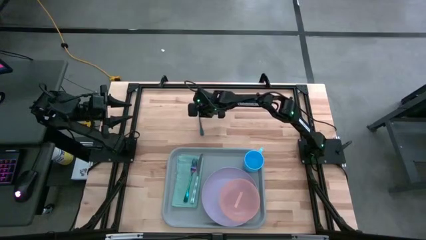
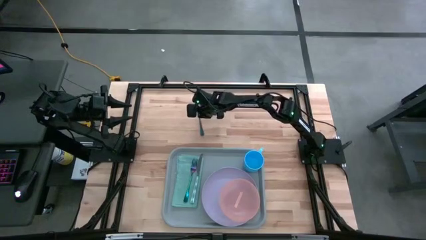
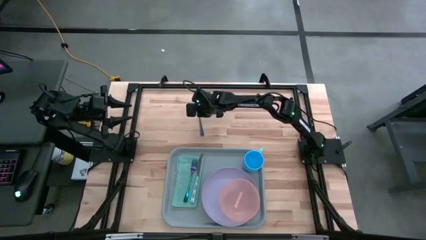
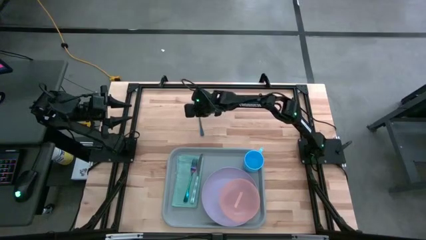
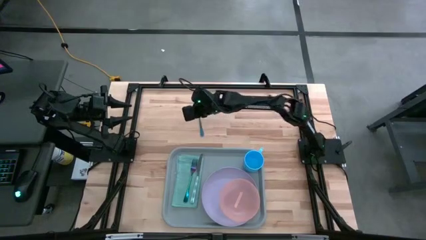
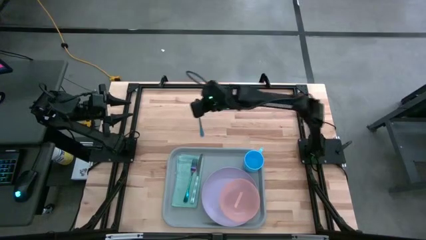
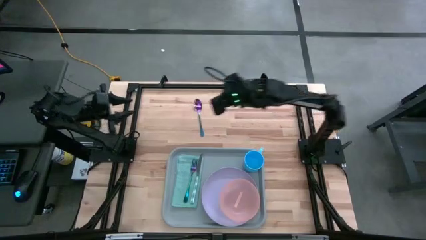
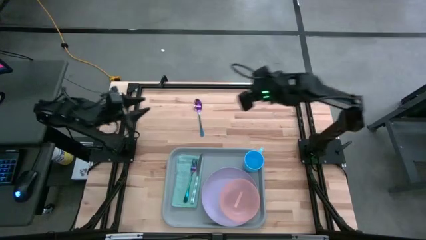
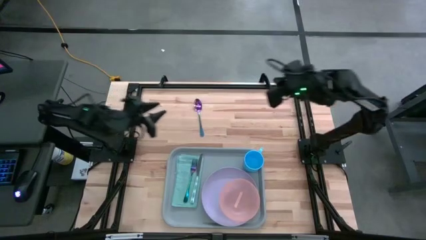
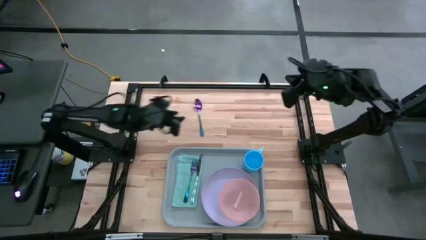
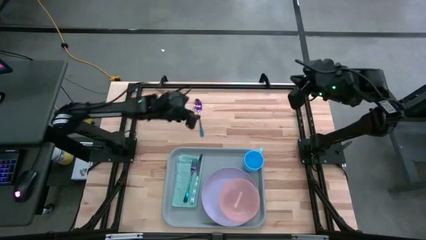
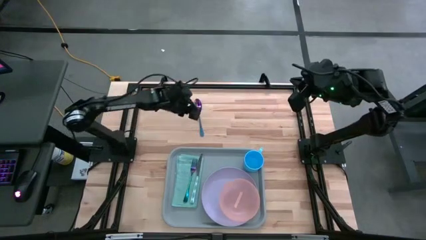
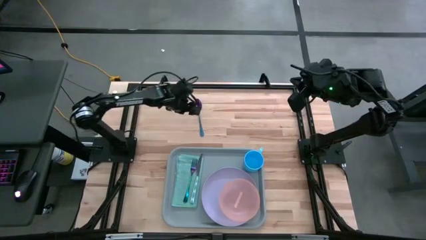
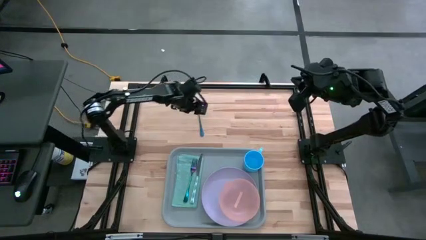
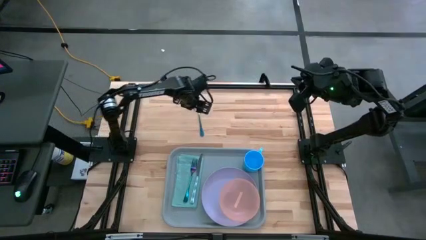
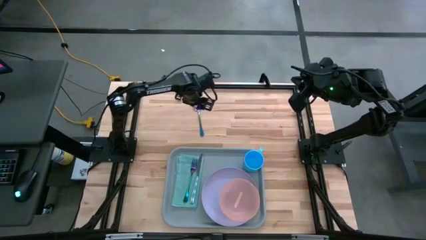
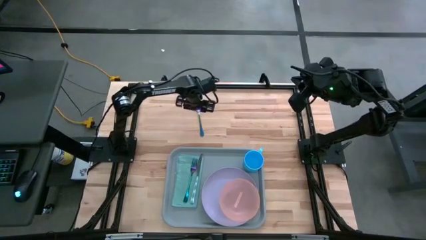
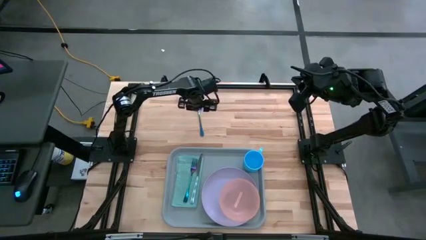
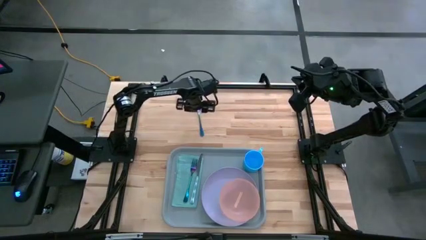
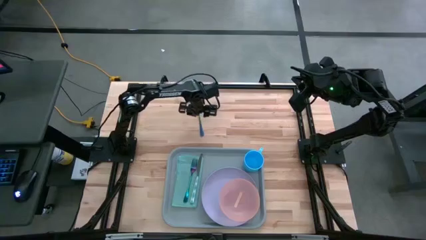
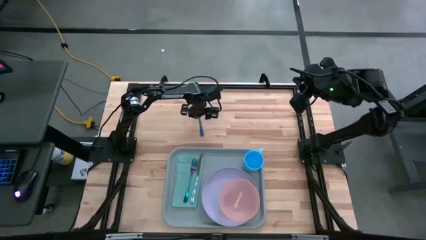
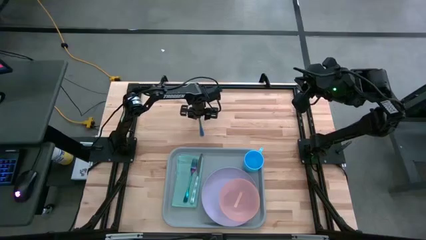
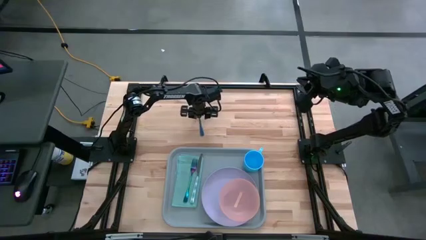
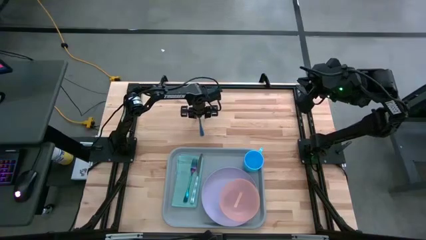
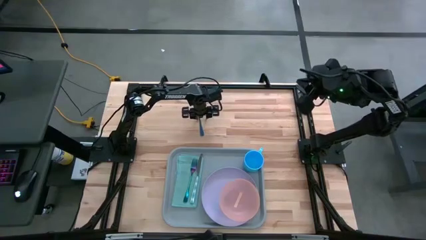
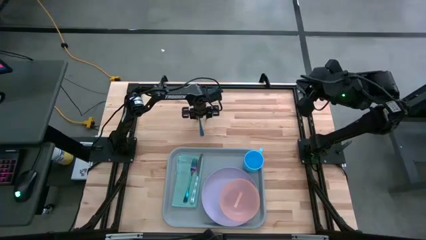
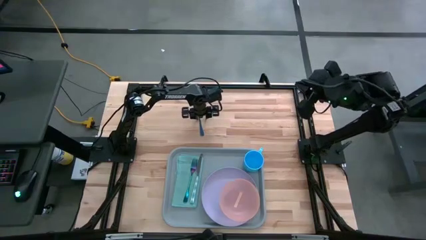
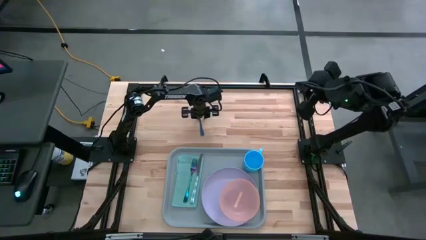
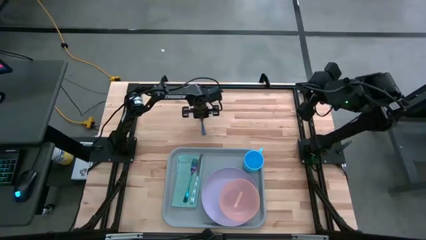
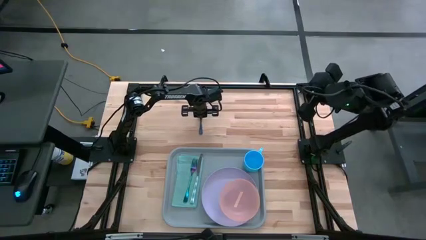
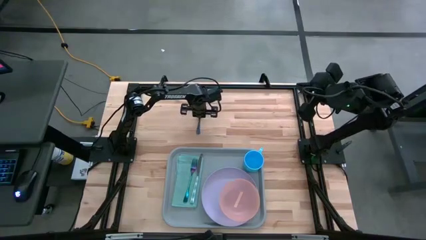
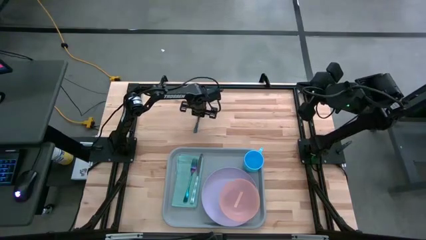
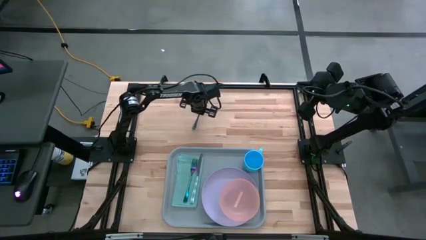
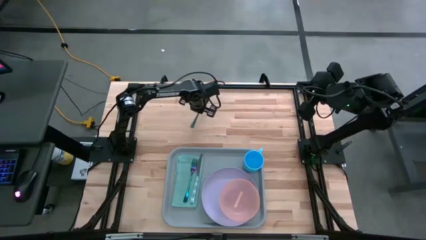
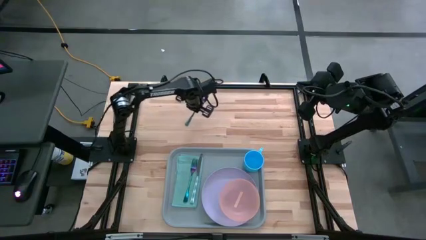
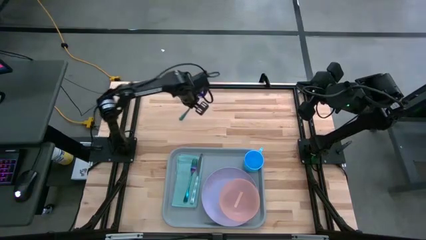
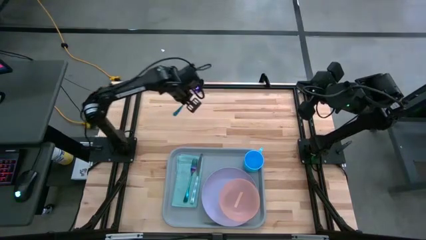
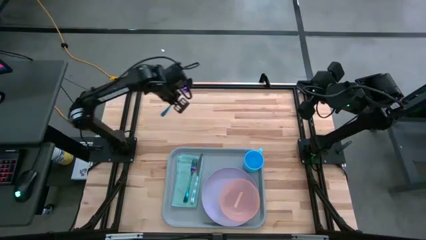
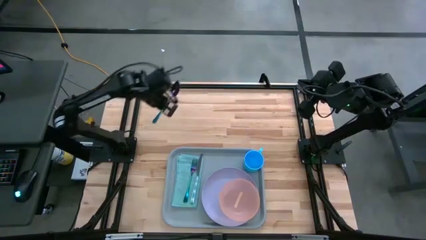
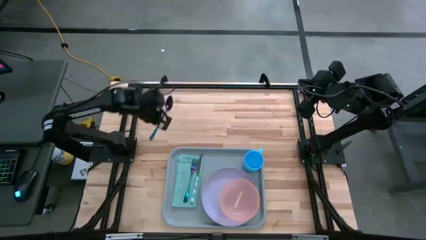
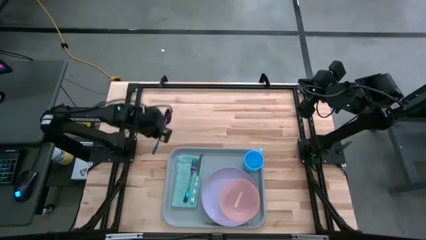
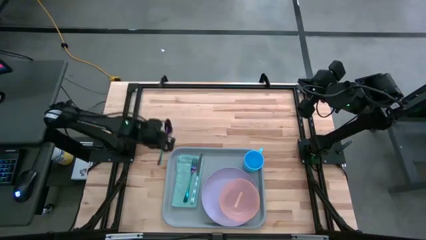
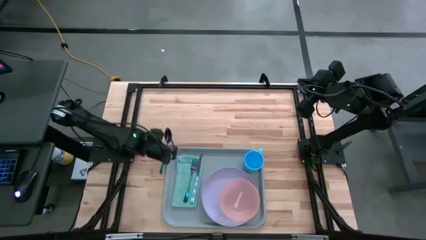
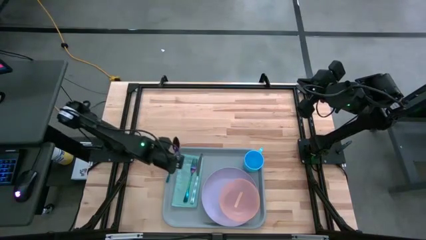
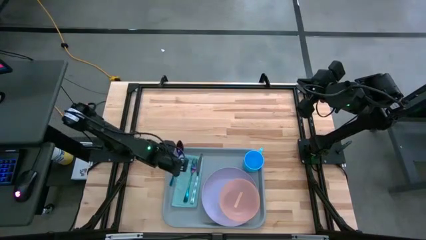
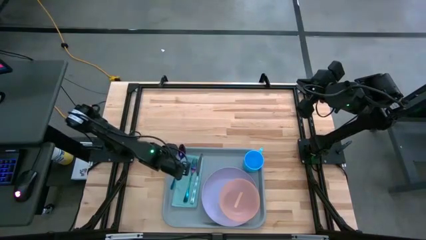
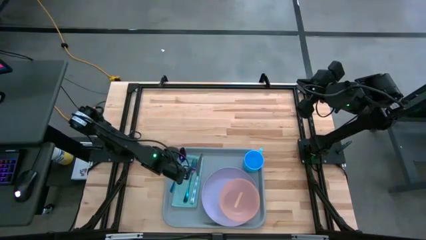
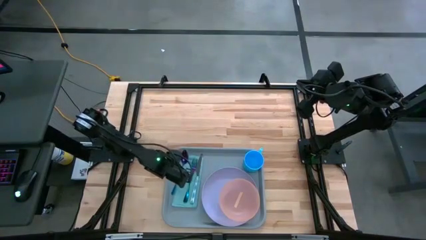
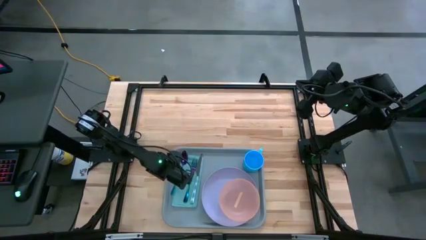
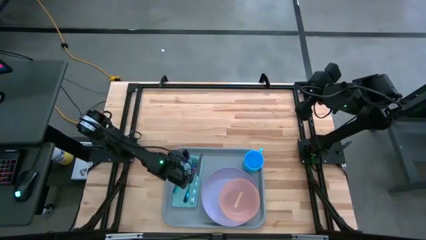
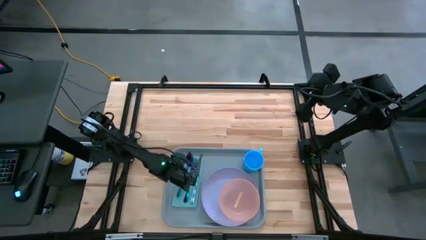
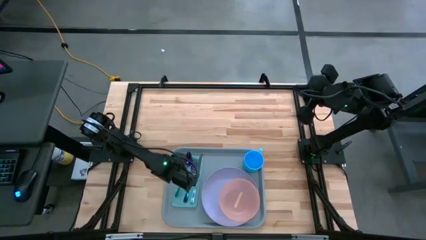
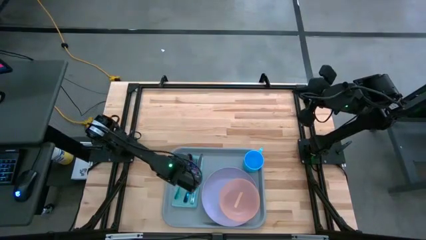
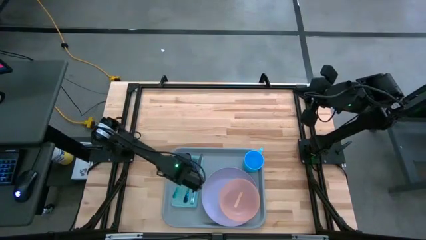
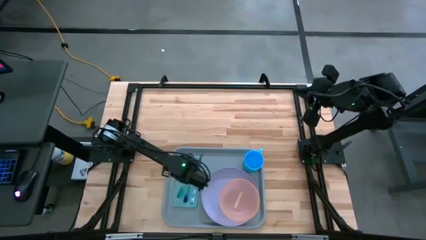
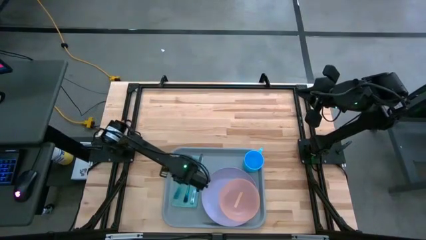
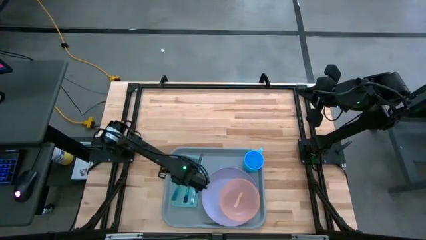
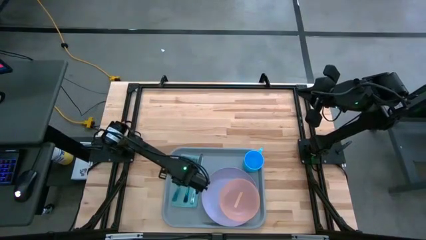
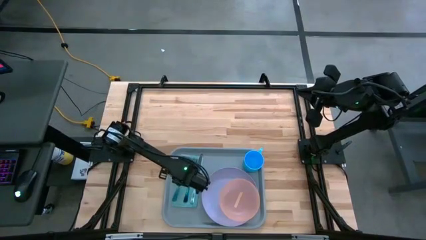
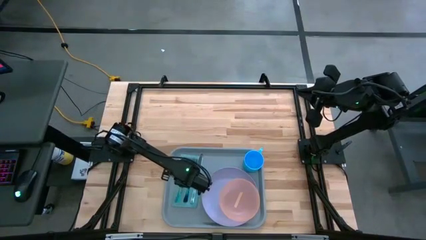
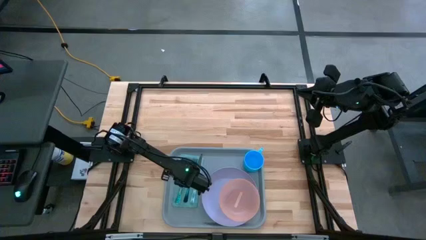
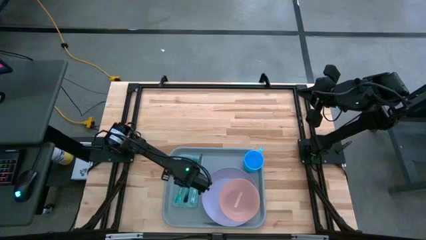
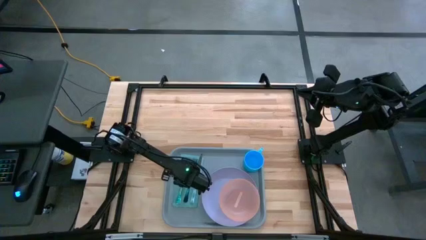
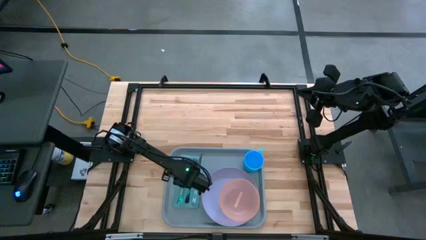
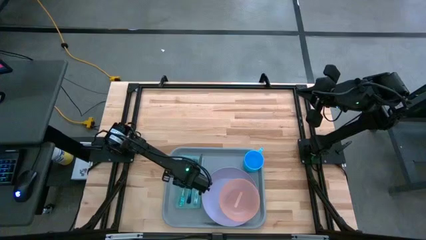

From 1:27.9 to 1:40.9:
Task: Set up tray
Put the blue spoon on top of the blue napkin to the left of the blue fork

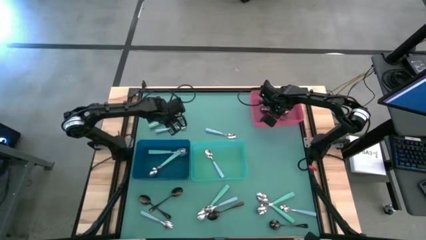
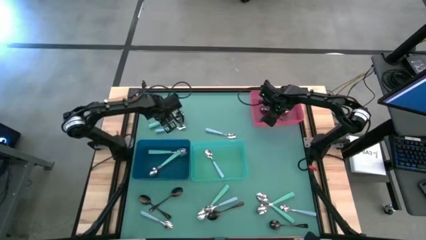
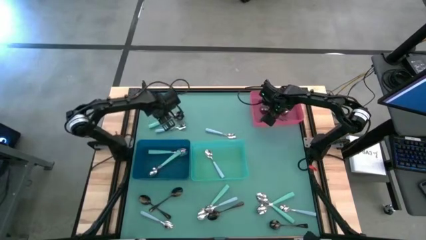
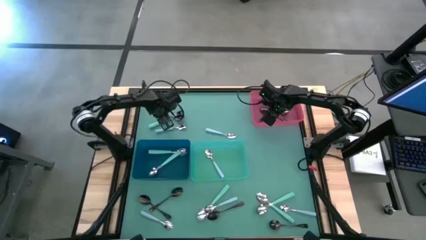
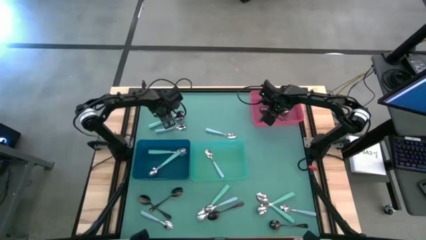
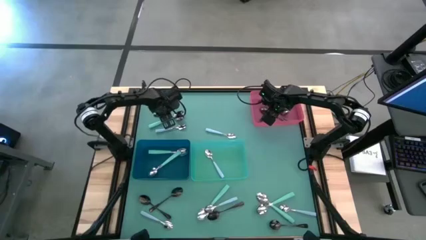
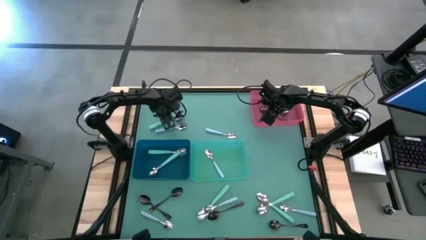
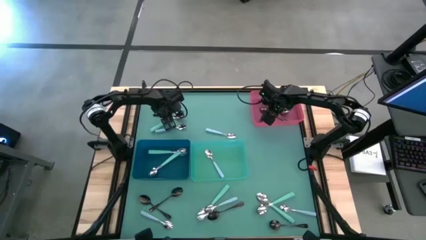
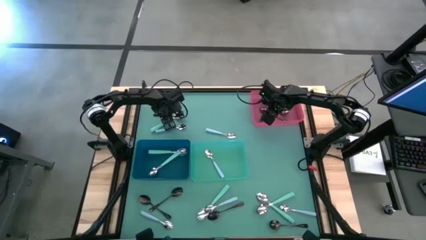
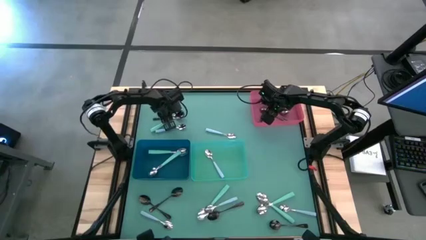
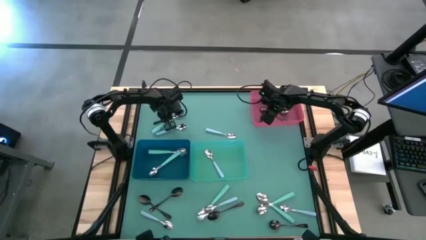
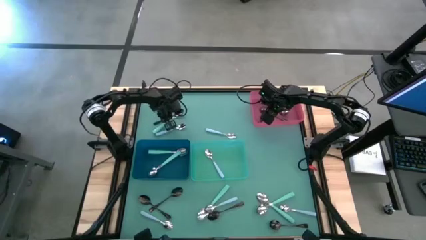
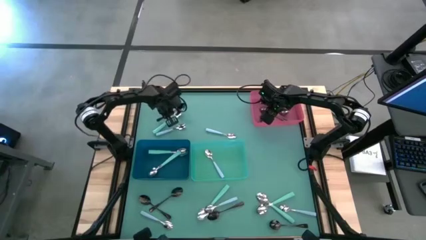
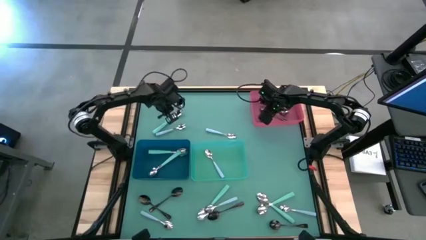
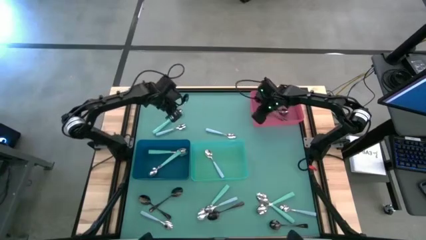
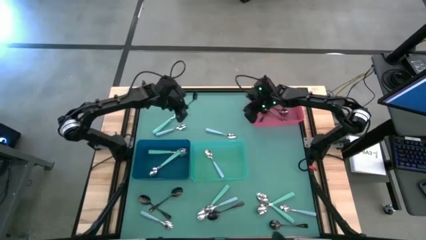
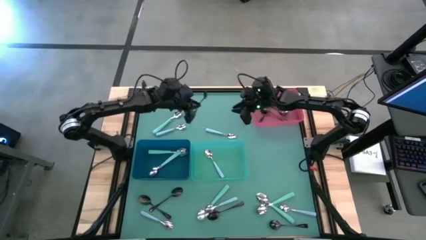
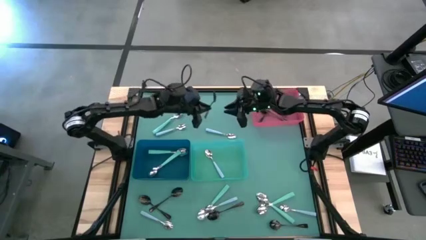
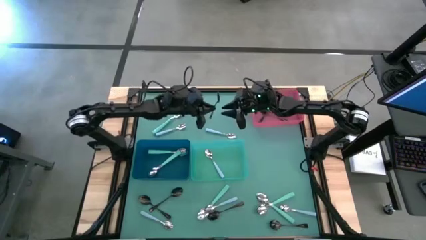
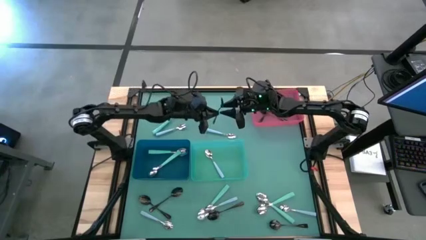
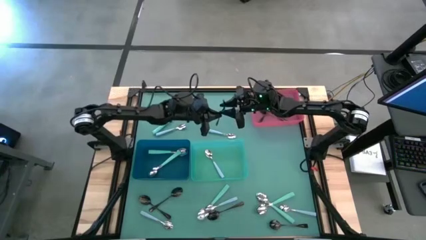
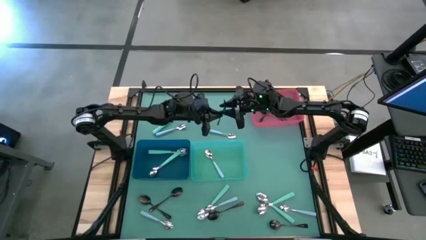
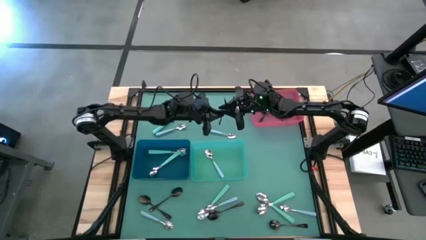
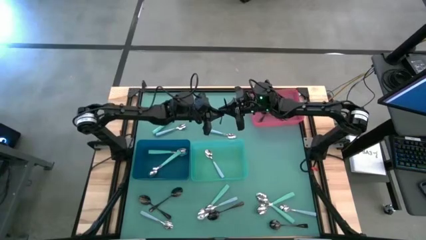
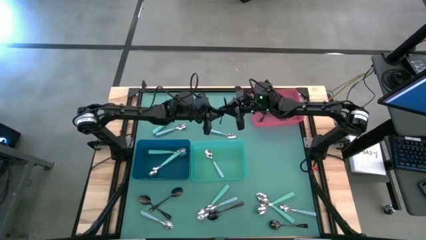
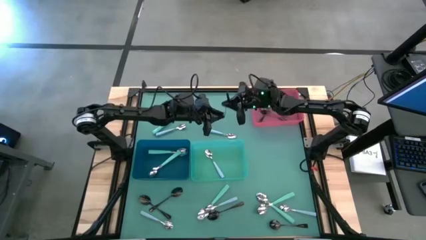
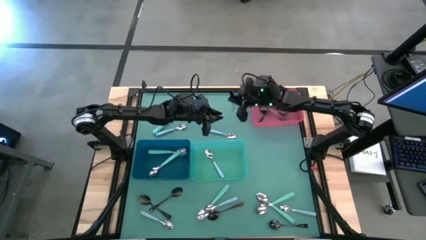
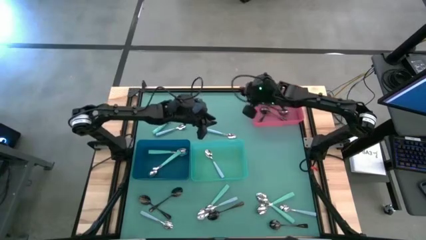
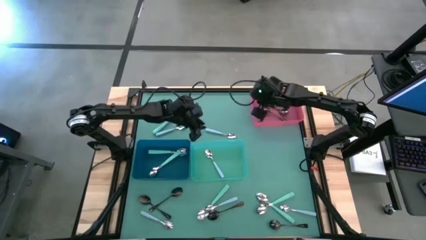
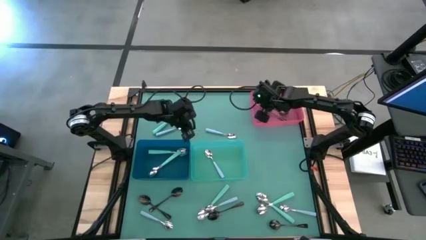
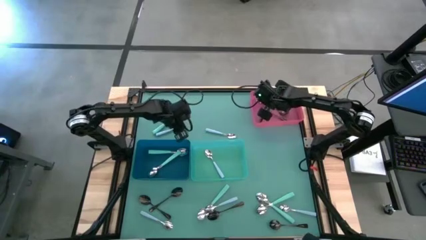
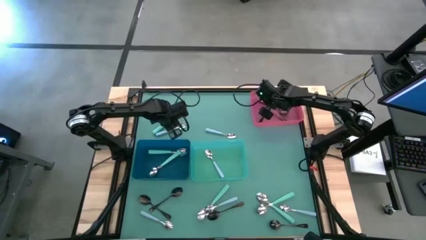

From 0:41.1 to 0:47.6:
Task: Sort silverware by color (type)
Put the black spoon into the pink bin
